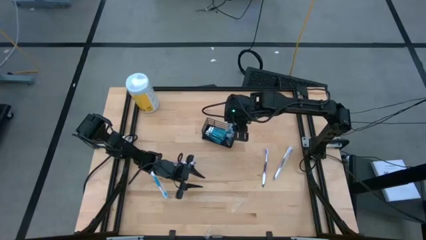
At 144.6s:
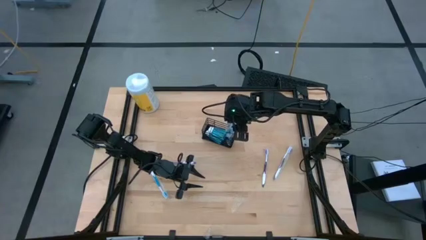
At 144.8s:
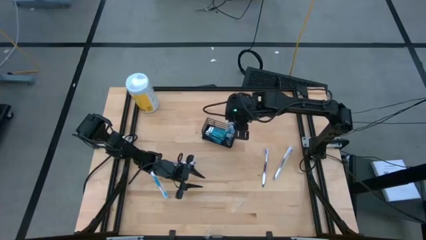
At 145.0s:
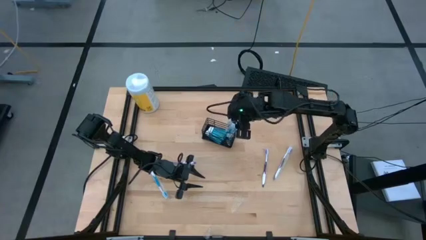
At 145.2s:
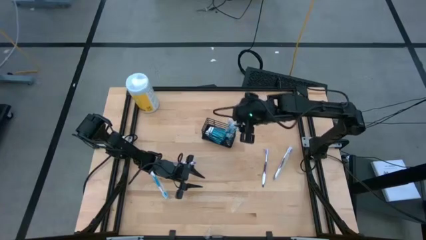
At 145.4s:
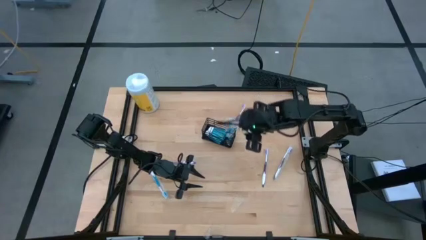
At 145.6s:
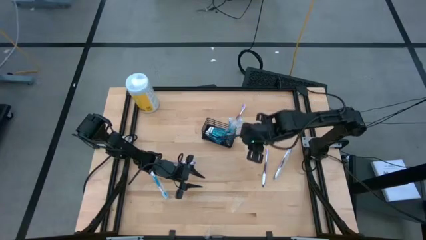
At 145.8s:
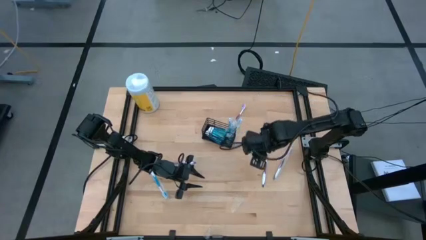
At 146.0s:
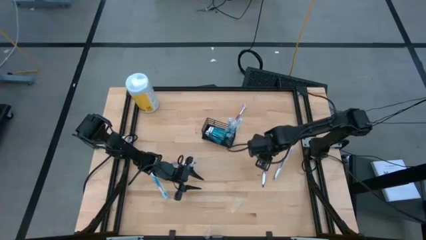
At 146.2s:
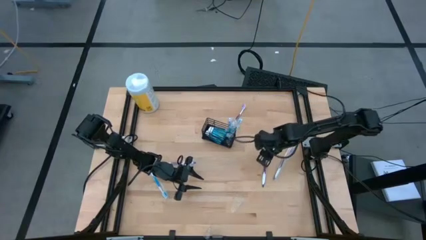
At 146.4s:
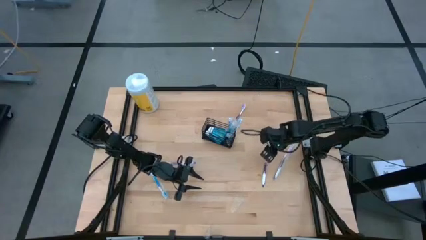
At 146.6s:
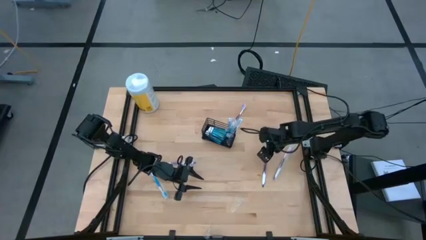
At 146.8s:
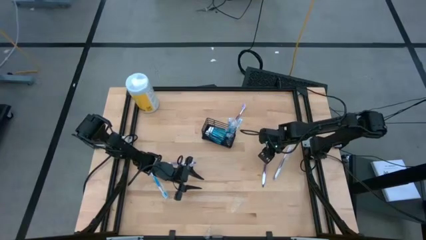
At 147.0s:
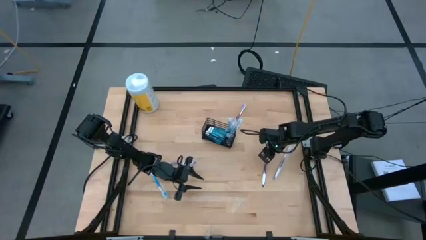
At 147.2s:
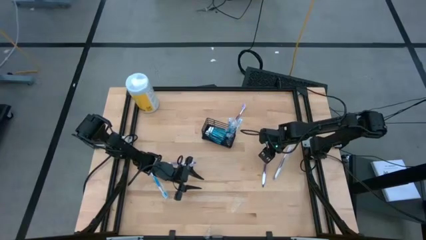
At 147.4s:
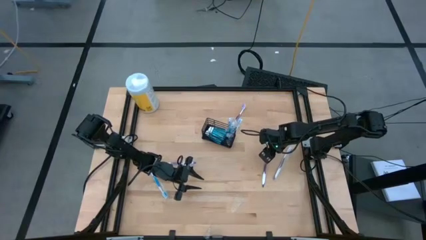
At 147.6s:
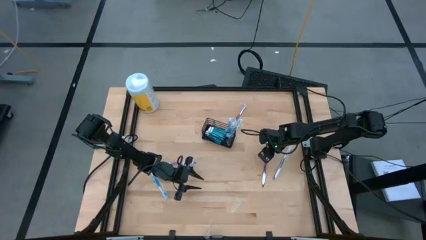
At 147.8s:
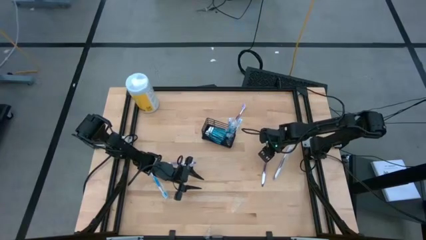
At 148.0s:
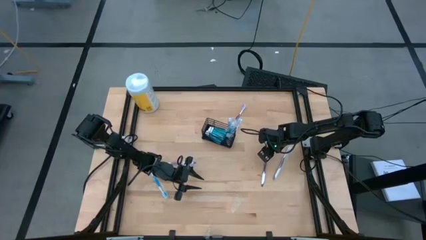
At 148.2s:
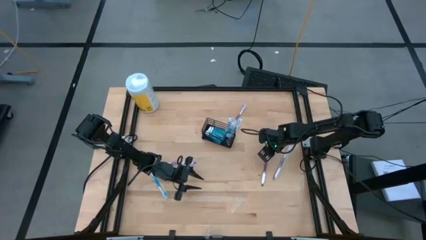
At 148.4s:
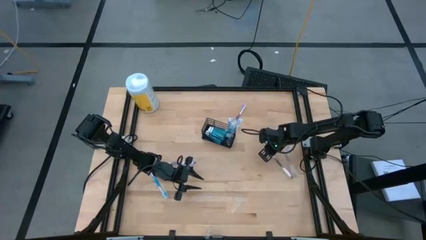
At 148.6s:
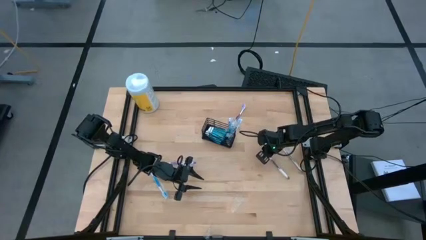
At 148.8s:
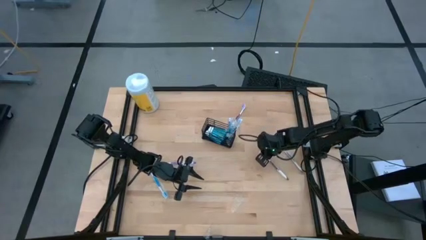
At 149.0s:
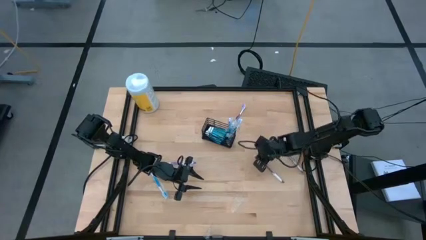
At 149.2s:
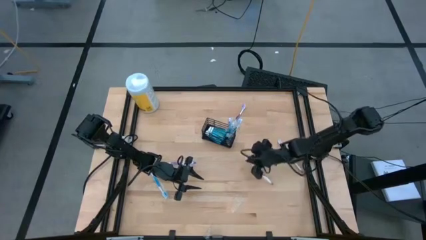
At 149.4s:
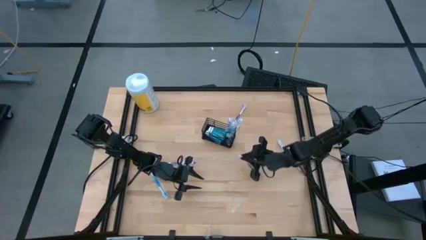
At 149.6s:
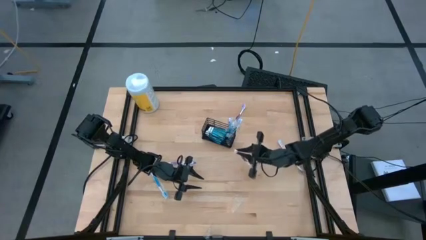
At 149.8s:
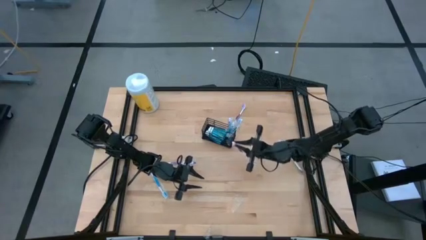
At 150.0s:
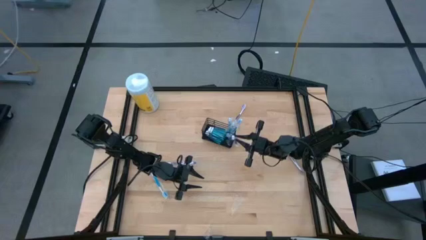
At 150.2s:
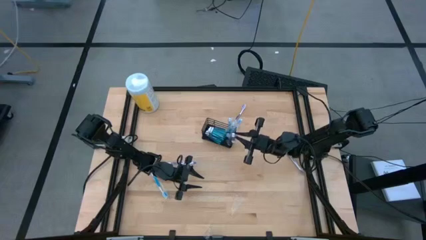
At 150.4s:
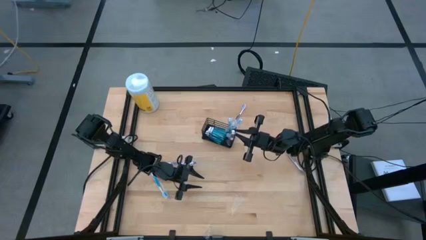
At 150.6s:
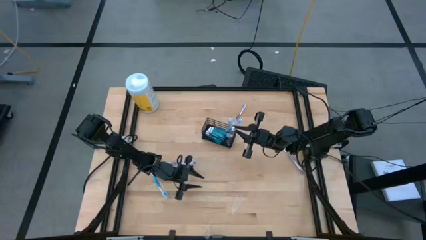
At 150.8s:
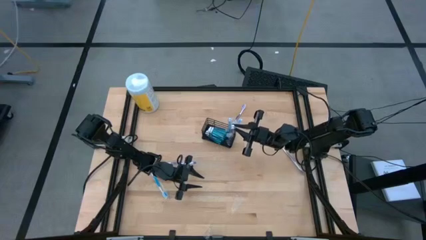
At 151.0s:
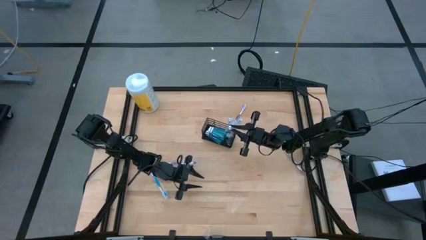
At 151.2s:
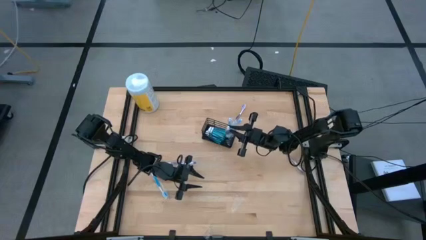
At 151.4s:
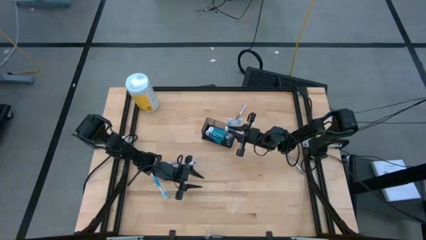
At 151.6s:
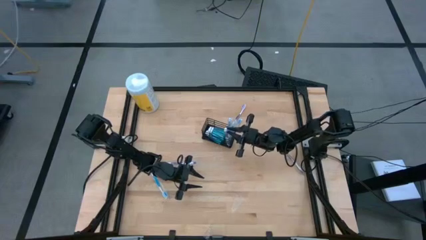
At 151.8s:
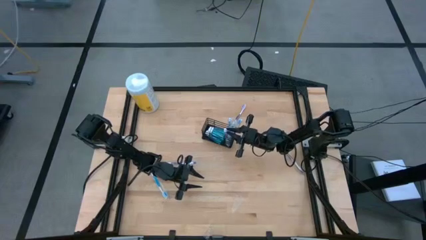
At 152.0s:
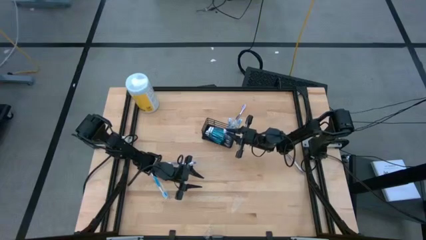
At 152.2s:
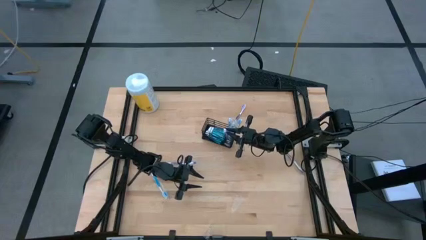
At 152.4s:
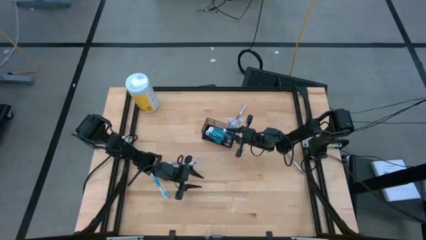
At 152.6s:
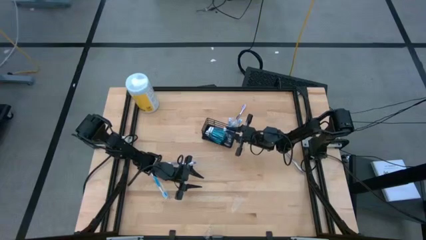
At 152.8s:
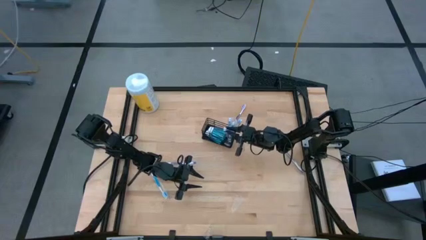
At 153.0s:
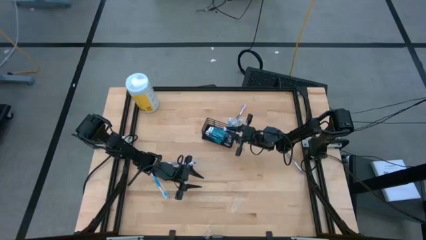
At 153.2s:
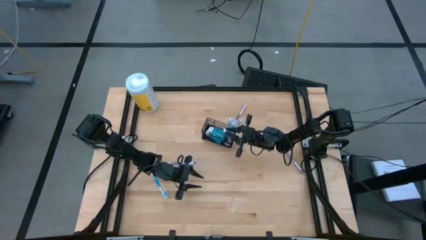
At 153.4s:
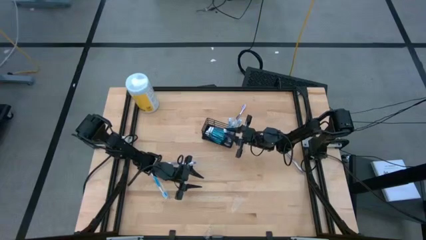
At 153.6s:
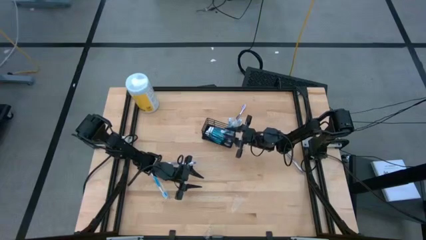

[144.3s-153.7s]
Task: Pick & Place toothbrushing station
Put the purple toothbrush into the wire organizer

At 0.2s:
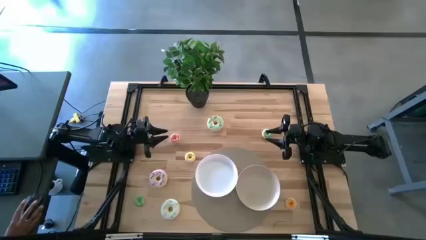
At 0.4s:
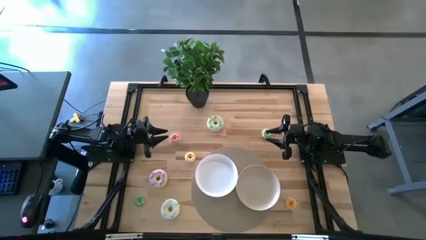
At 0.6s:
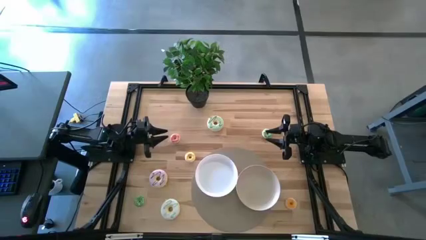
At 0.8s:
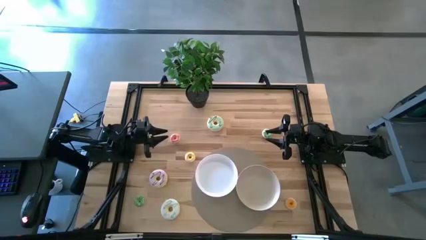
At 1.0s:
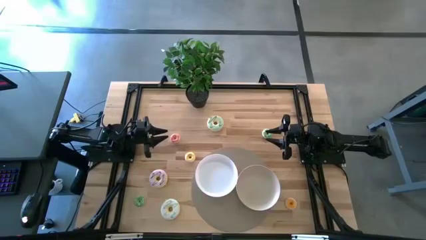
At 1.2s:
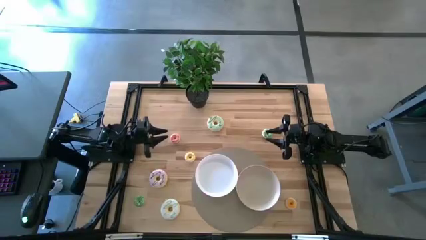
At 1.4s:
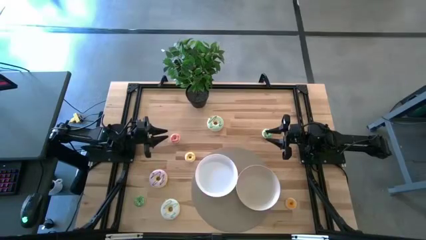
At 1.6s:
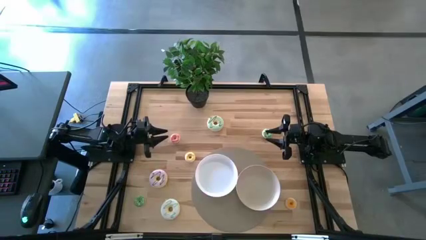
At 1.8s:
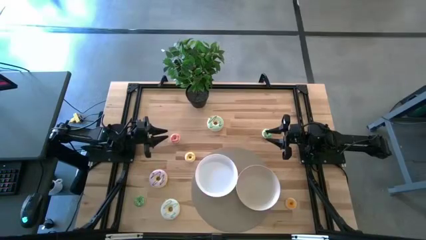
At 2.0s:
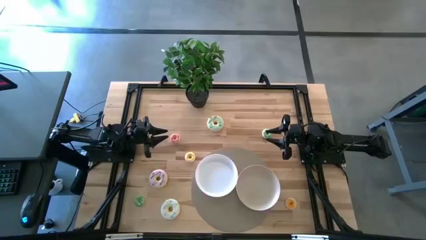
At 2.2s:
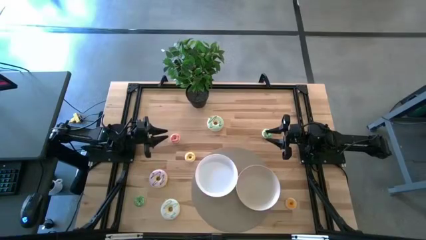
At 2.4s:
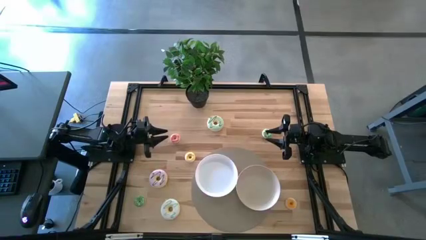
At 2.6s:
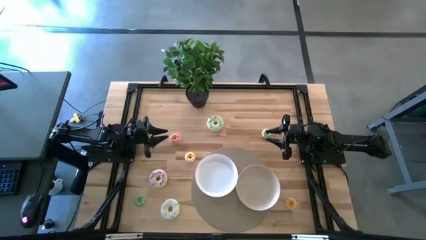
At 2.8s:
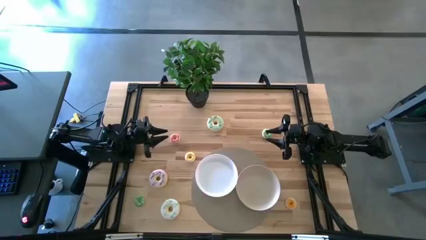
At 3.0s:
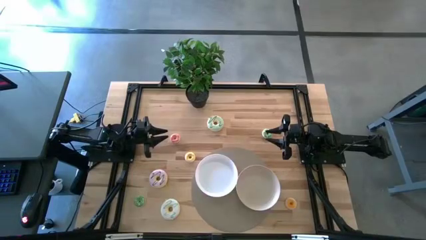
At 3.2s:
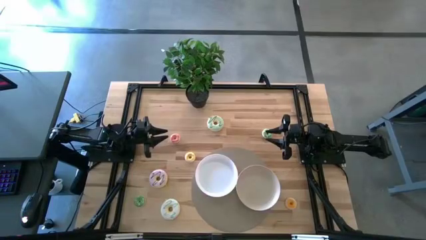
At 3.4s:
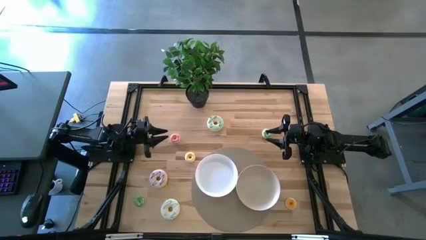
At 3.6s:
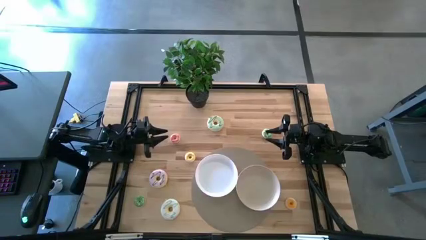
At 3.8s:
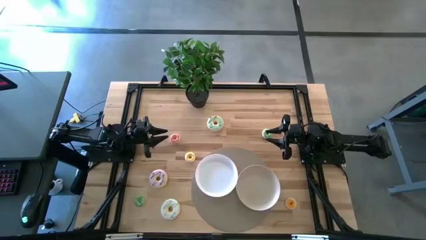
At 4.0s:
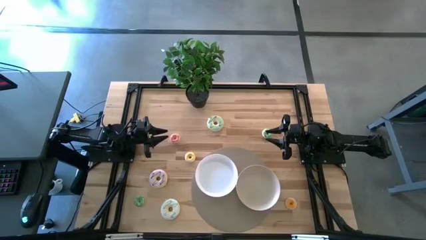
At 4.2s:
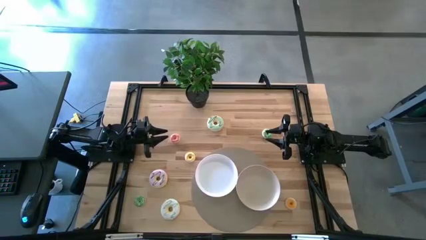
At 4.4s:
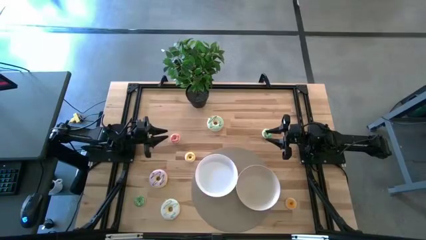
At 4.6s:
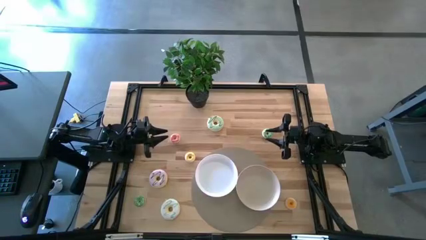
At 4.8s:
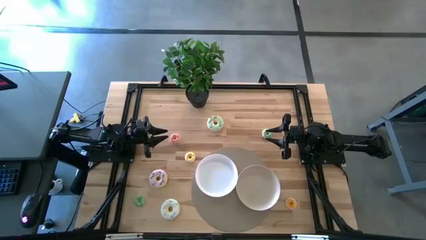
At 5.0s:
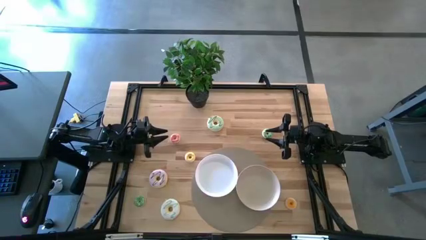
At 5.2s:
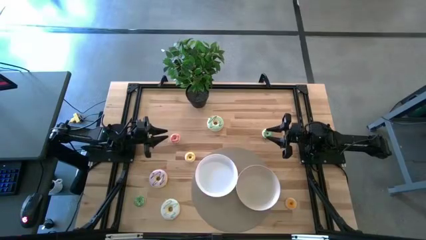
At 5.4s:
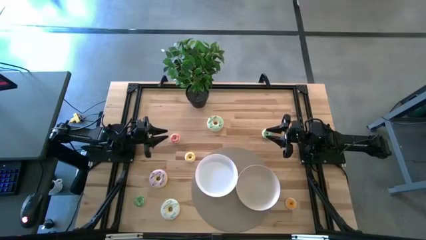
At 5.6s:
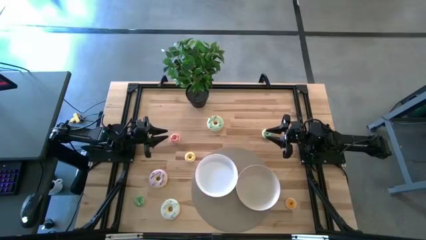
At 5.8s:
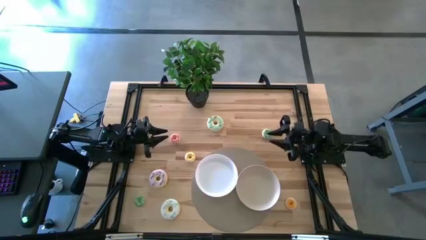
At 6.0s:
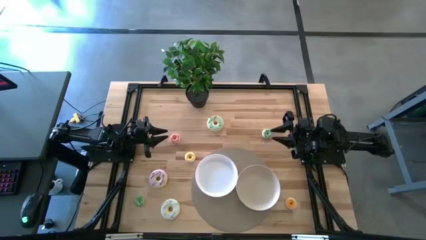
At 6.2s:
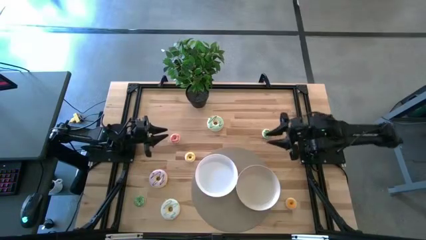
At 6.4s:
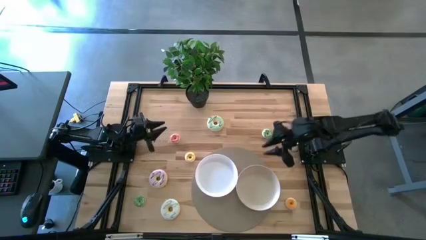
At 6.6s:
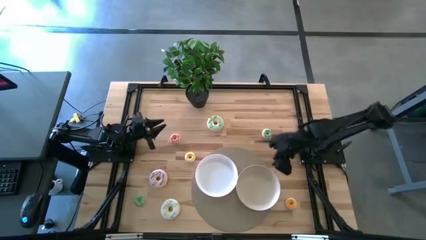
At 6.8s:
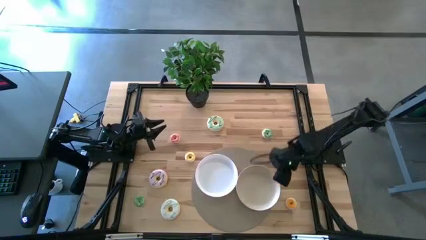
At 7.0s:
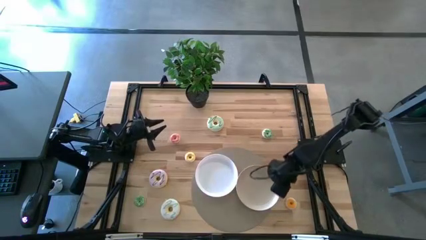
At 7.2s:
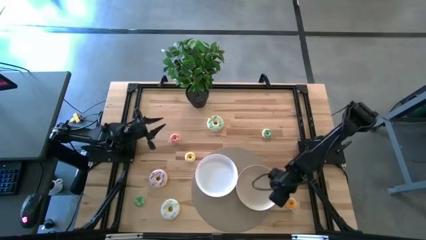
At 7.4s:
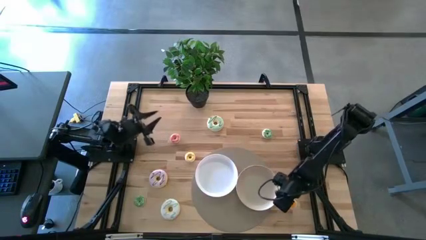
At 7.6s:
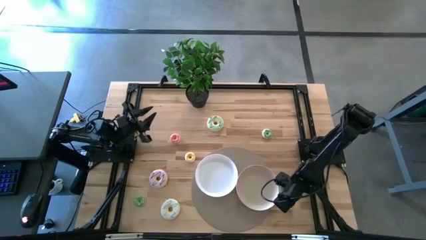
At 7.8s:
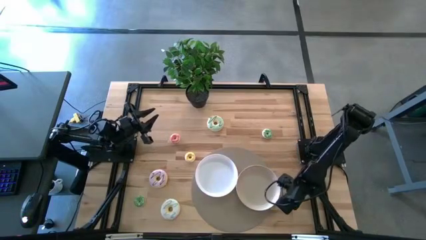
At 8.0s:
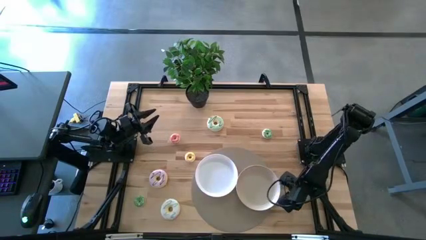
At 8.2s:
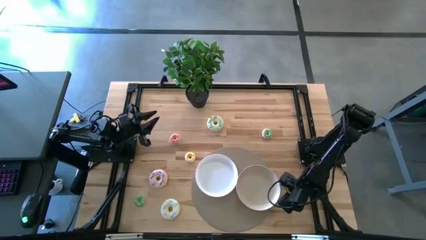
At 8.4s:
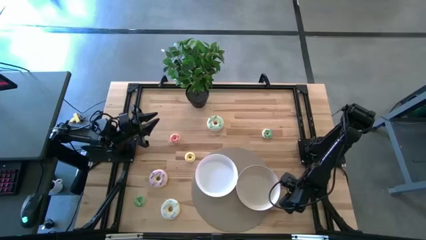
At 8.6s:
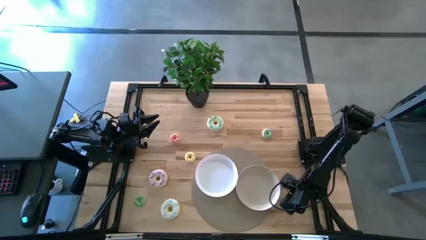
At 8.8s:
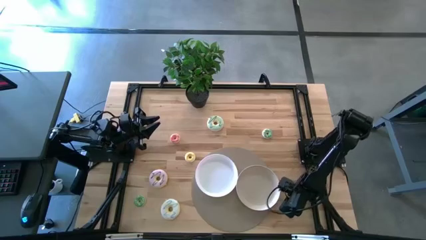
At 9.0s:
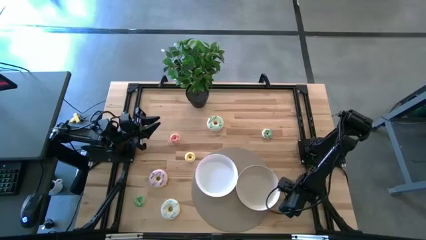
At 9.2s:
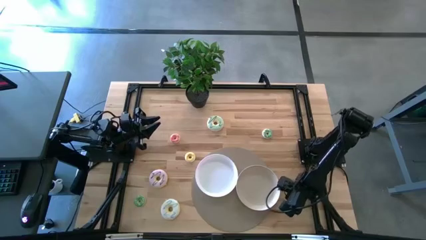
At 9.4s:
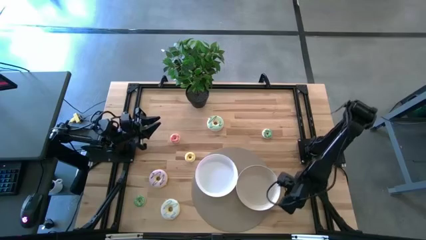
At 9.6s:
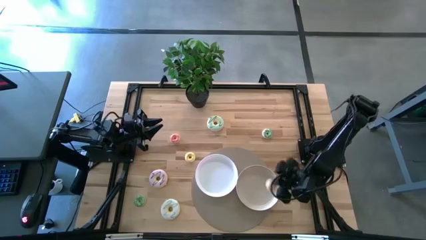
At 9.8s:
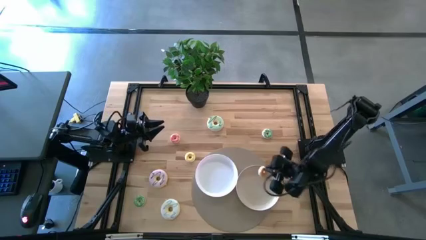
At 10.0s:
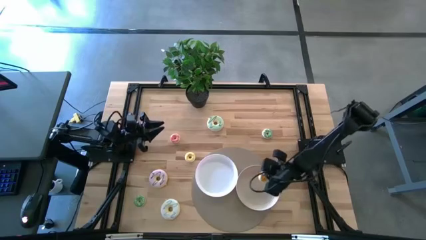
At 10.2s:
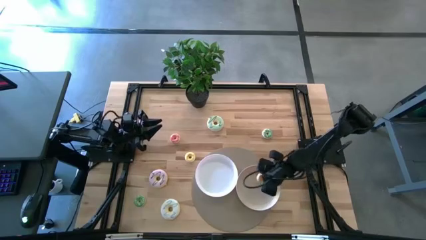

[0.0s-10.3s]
Task: Pick & Place donuts
Put the small orange doughnut on the gray plate
